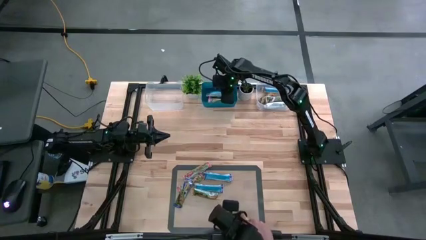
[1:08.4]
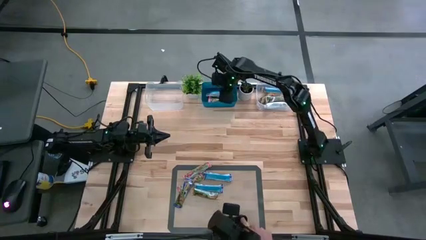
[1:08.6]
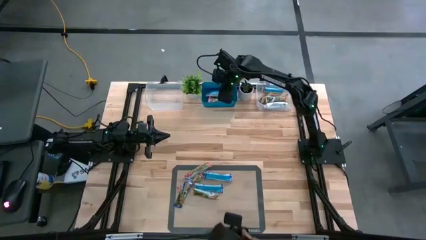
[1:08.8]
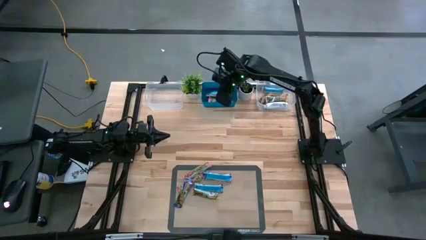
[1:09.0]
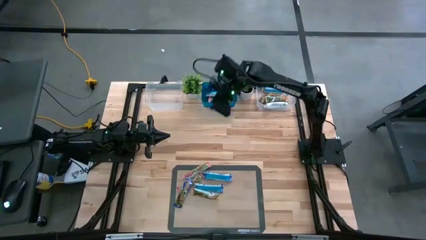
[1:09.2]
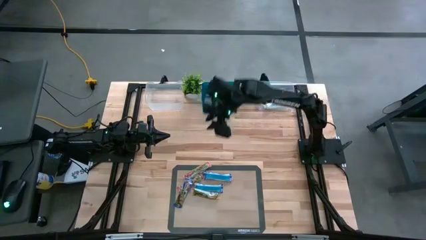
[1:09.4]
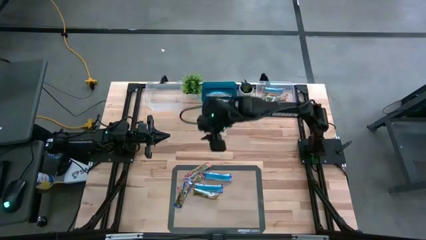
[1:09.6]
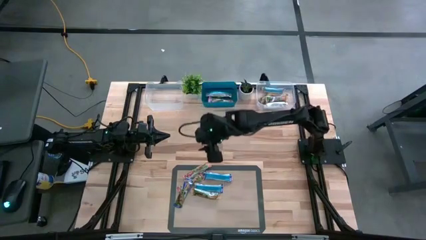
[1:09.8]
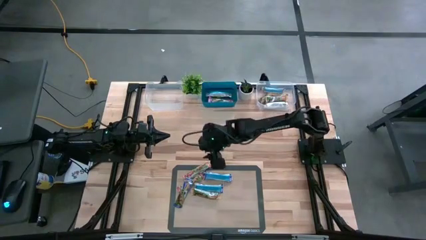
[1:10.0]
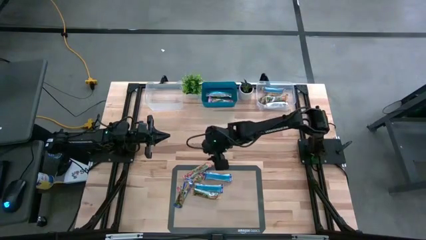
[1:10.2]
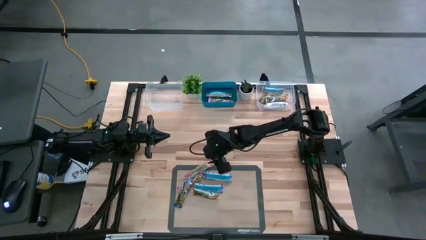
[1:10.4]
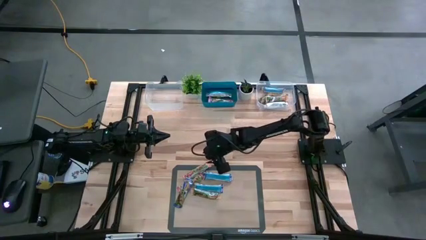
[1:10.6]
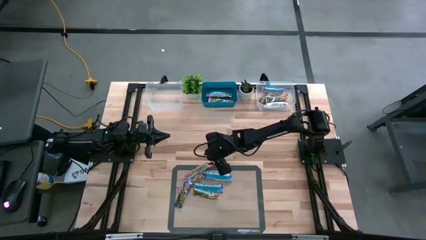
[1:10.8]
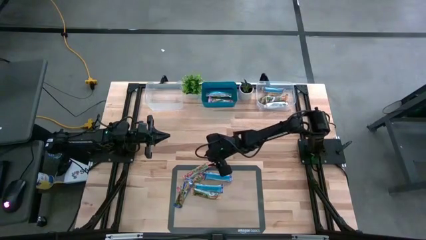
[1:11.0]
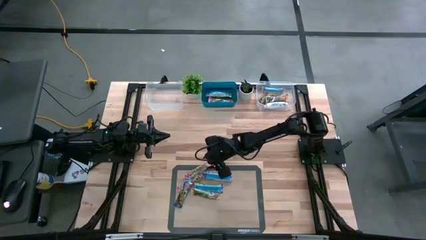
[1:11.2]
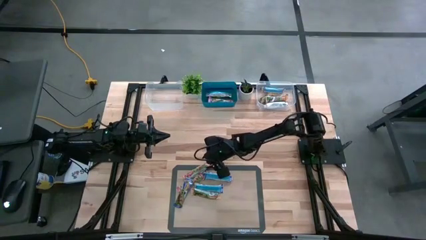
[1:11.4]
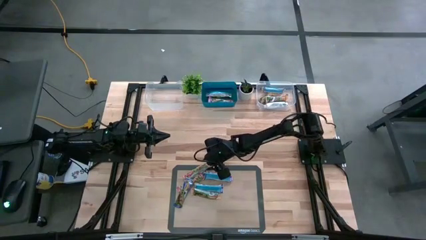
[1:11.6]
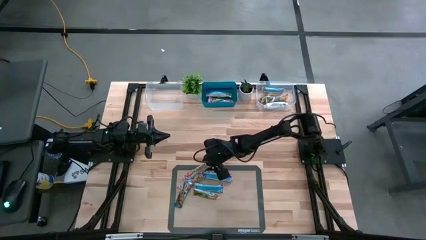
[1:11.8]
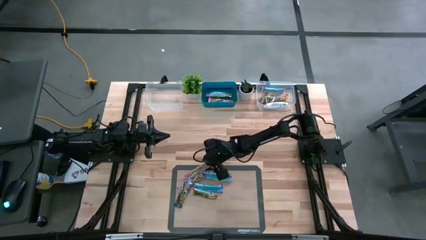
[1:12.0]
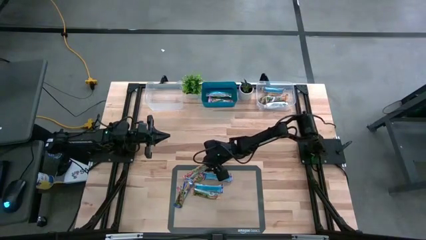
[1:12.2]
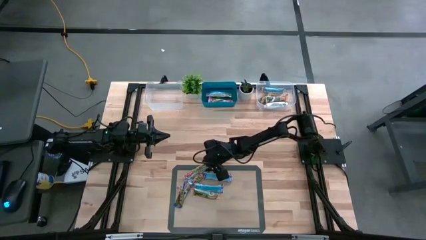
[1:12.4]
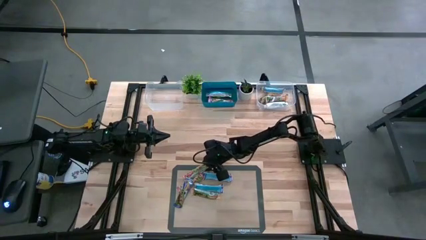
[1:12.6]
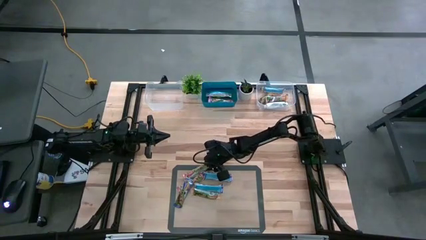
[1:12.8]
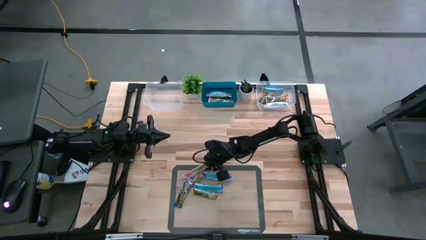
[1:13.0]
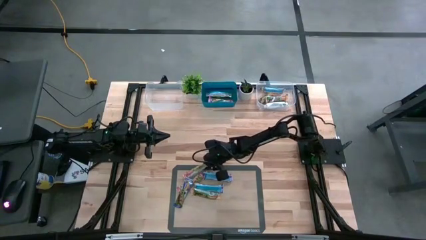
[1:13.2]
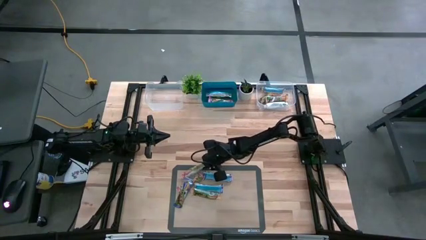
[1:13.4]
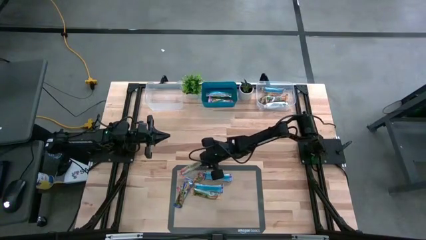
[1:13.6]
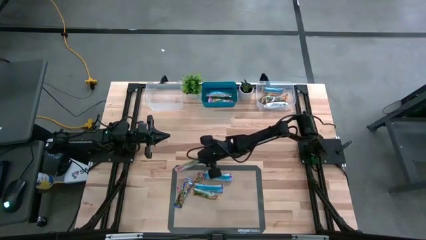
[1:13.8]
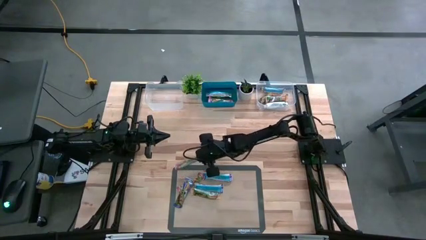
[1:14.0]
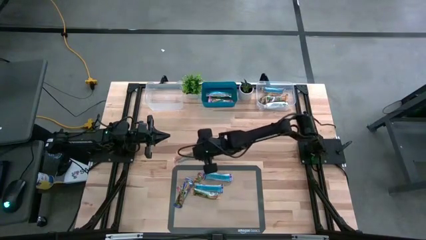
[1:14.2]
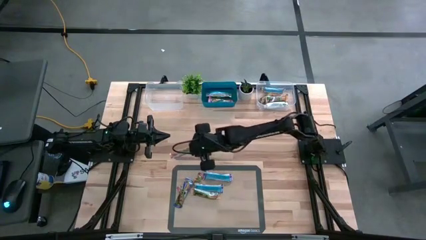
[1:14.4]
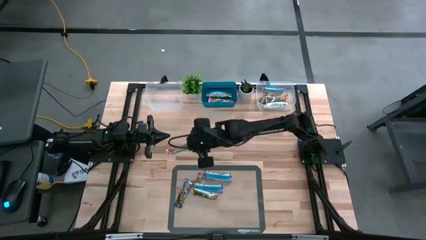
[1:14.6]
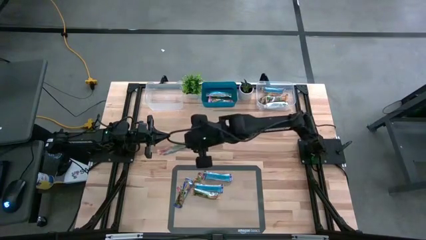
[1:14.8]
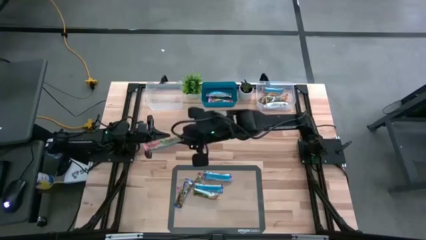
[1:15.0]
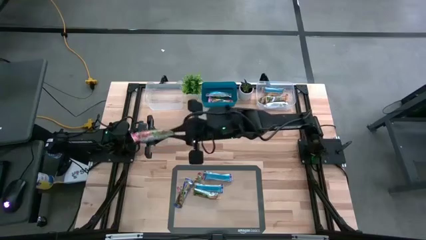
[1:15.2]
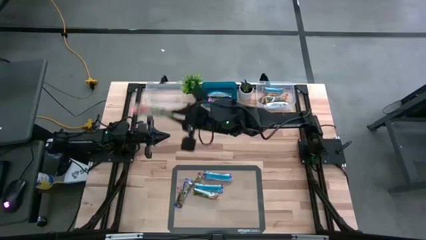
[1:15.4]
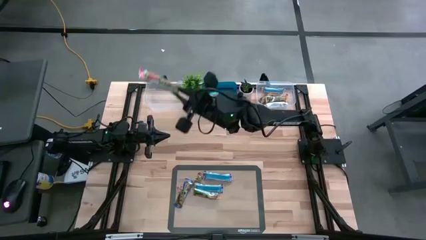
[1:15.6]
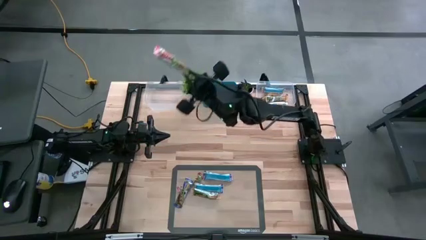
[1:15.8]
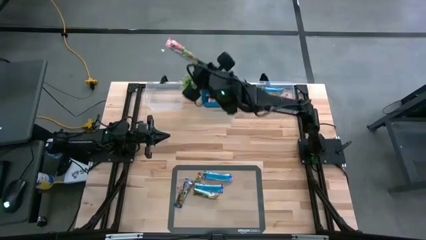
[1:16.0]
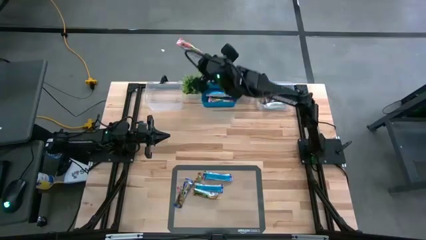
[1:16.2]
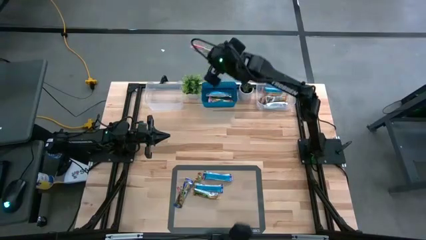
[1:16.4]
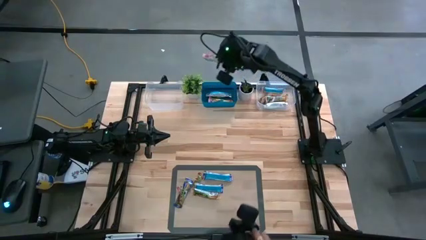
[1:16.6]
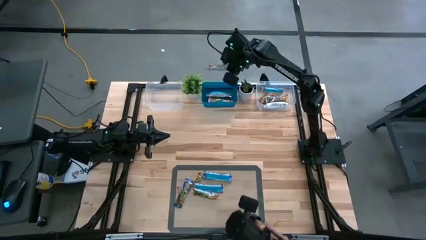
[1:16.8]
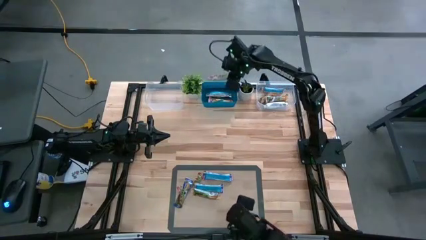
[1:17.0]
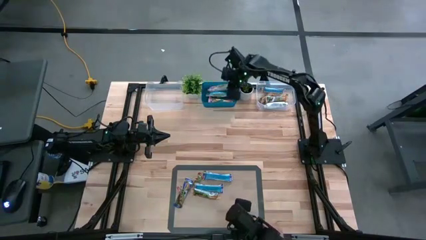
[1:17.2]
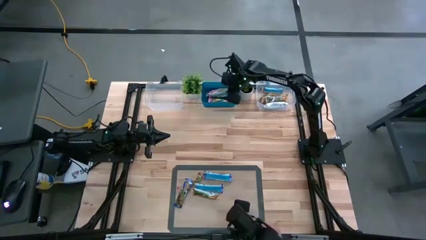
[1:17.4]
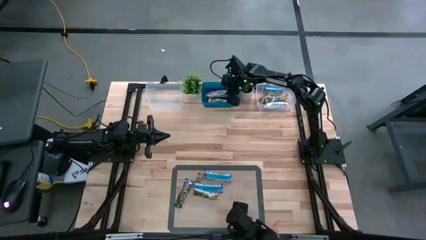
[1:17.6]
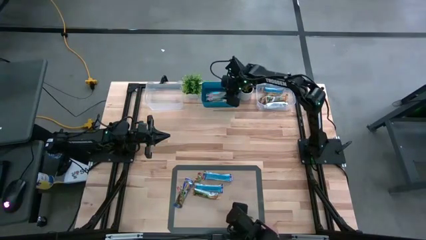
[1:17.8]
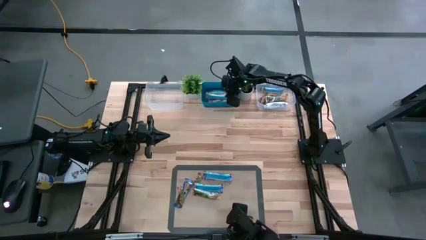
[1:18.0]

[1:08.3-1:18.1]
Task: Pick and place Granola Bars by type
Put the red granola bar into the blue bin

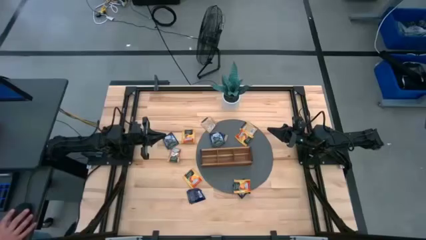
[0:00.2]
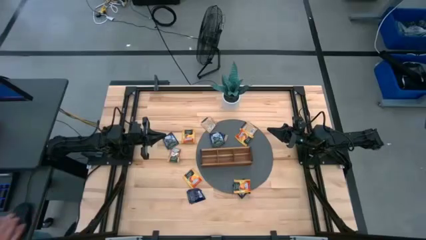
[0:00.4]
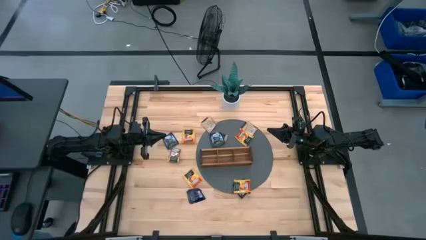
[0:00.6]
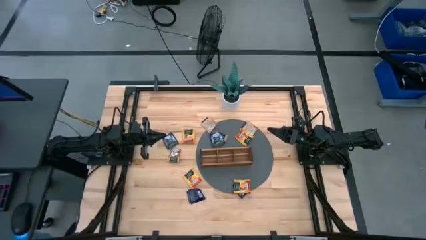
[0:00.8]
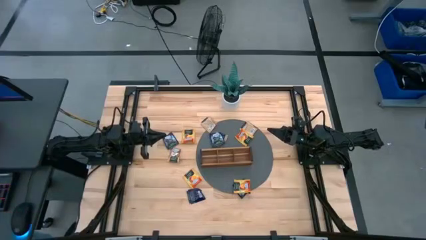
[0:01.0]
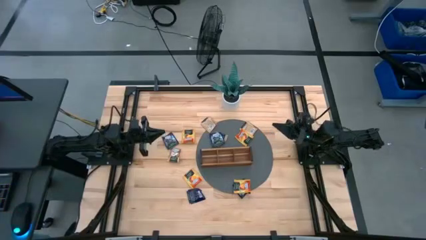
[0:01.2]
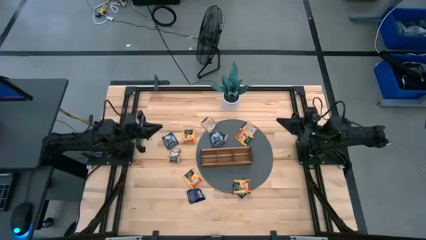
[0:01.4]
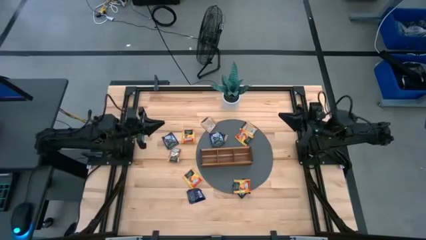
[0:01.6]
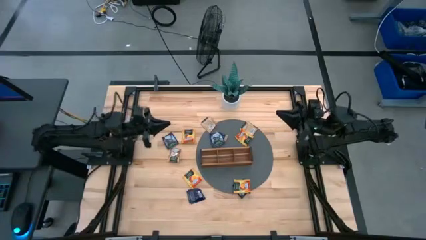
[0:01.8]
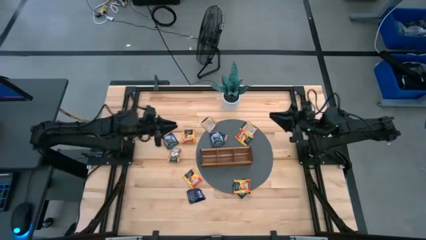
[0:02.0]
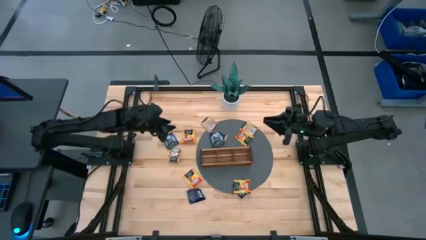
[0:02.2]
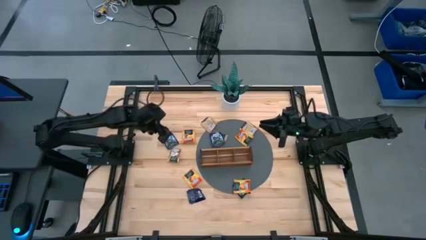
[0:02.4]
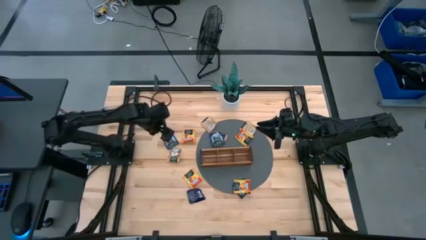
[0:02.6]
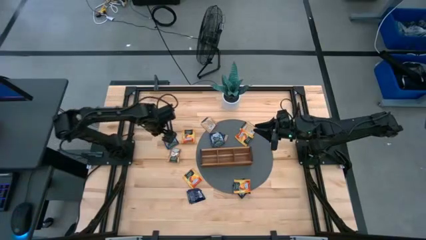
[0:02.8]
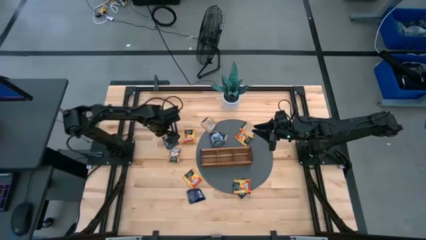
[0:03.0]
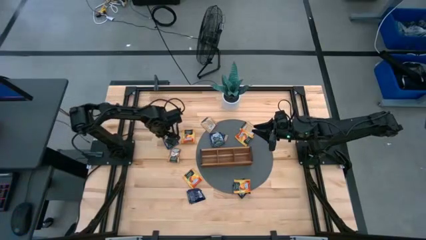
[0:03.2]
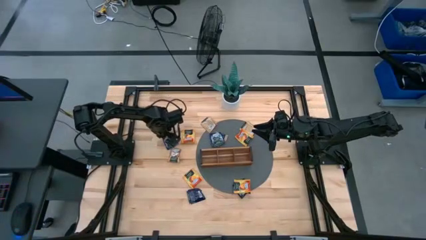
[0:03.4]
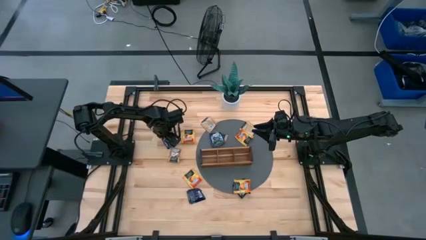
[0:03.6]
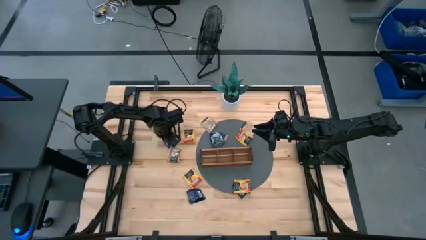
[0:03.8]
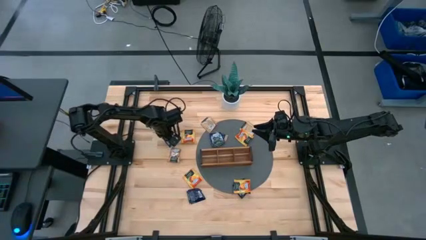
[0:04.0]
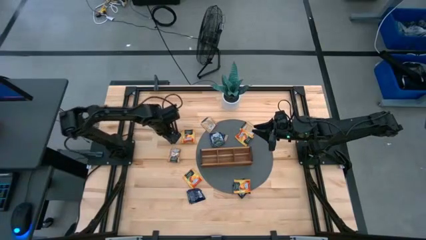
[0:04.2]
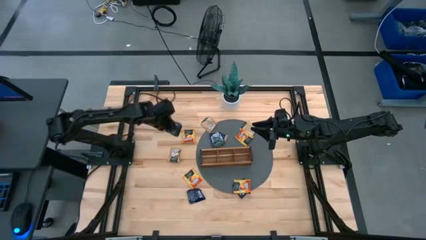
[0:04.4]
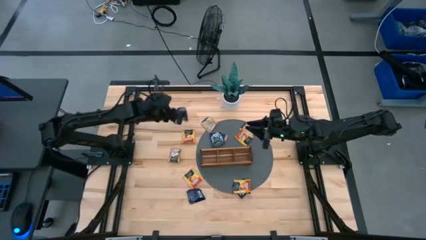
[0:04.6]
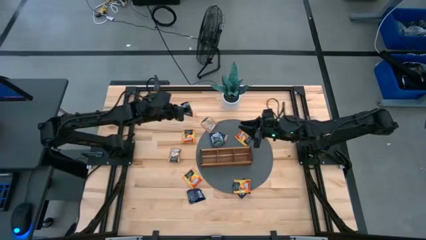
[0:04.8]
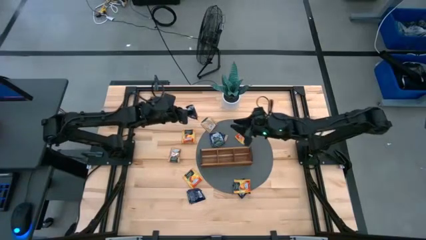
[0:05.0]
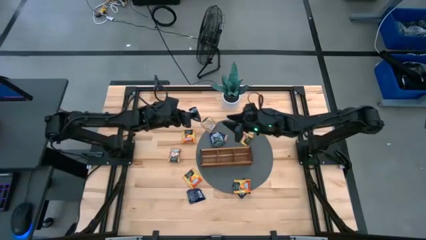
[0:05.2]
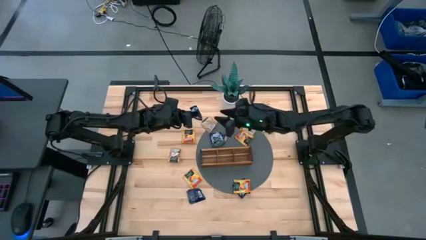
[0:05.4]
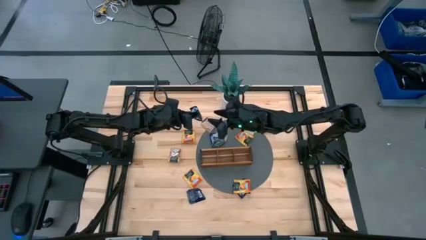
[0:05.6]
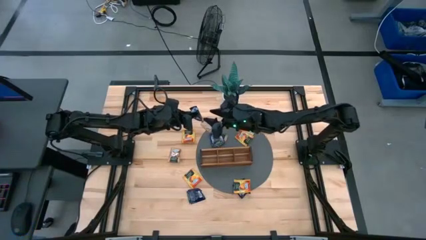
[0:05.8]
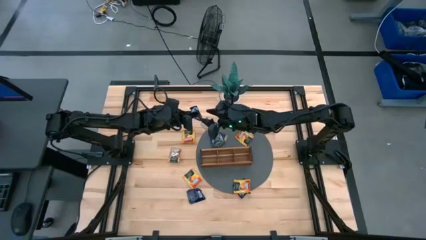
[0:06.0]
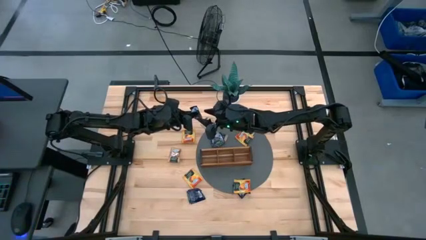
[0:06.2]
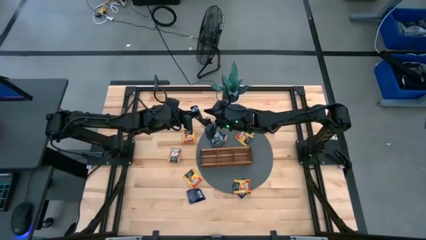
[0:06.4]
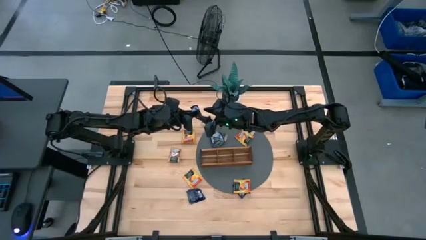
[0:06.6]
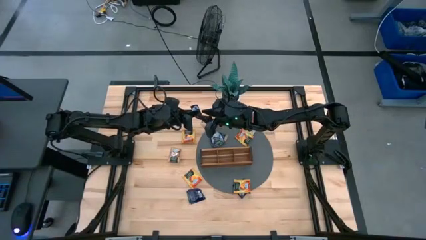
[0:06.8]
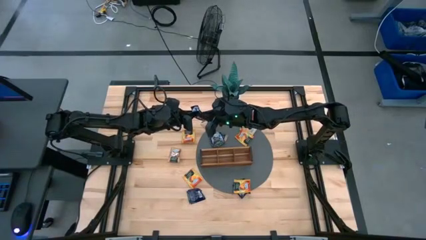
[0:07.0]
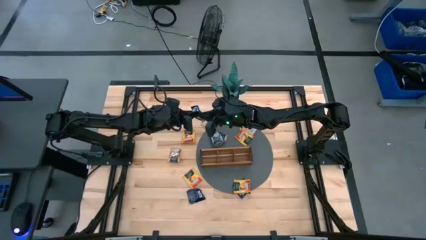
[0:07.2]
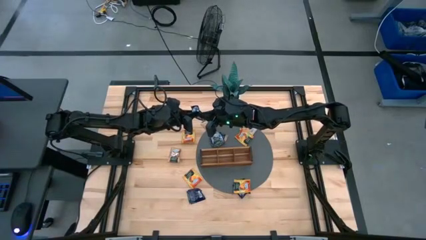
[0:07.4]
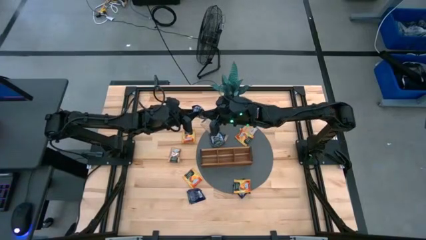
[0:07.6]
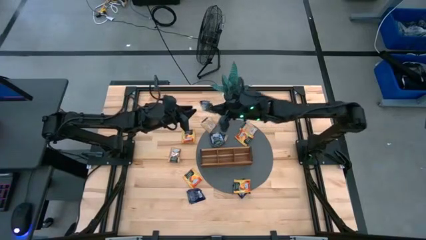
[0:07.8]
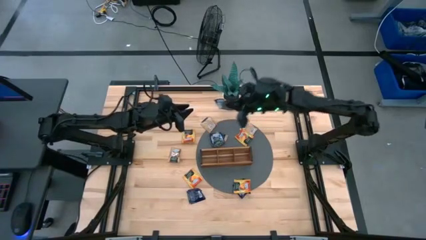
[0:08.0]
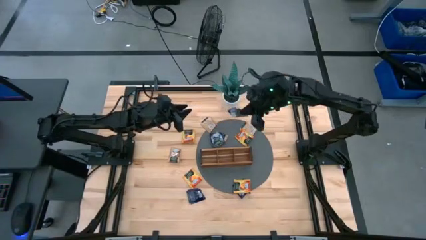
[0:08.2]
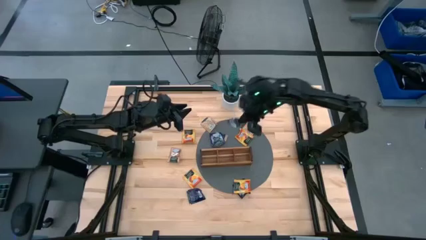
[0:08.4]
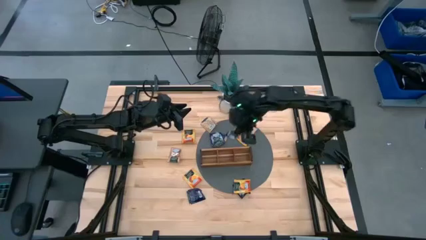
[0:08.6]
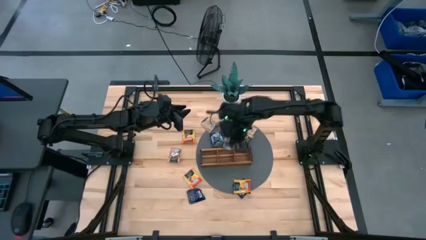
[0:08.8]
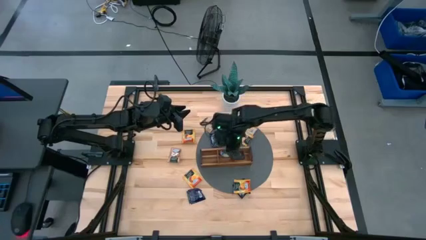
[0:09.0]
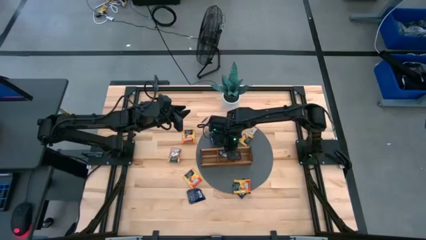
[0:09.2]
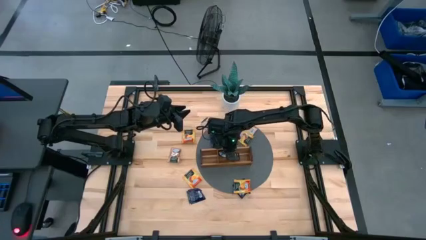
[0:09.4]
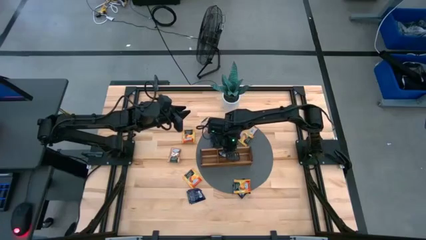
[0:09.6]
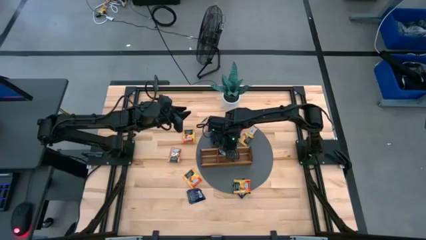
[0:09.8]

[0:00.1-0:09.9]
Task: Pick & Place Tea
Put the black tea bag into the middle section of the wooden organizer
